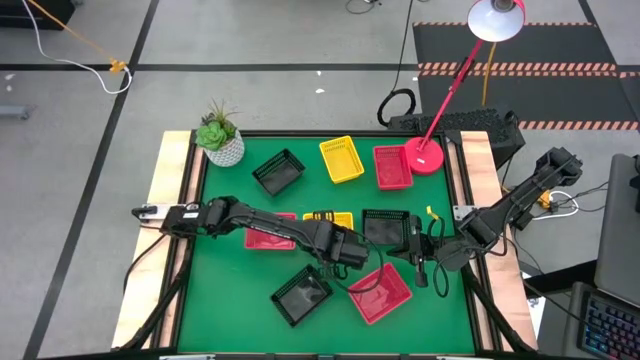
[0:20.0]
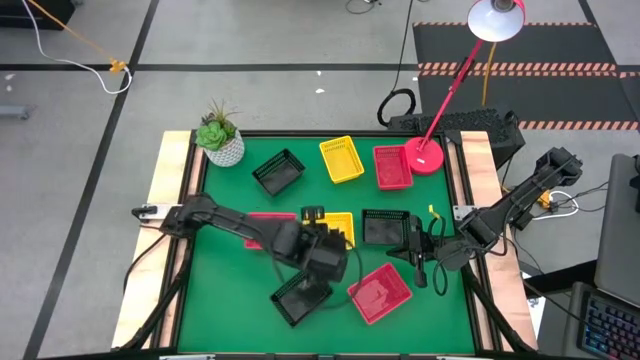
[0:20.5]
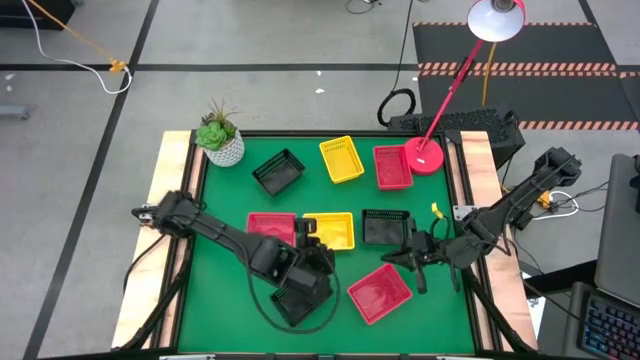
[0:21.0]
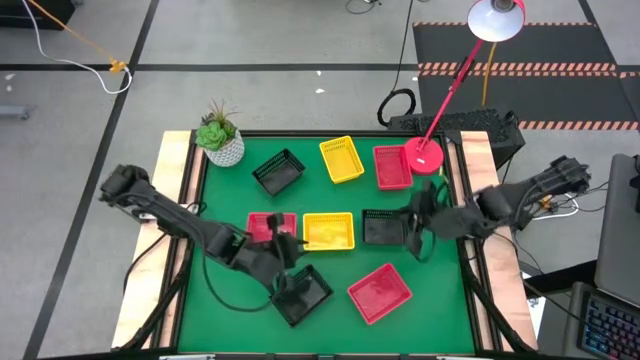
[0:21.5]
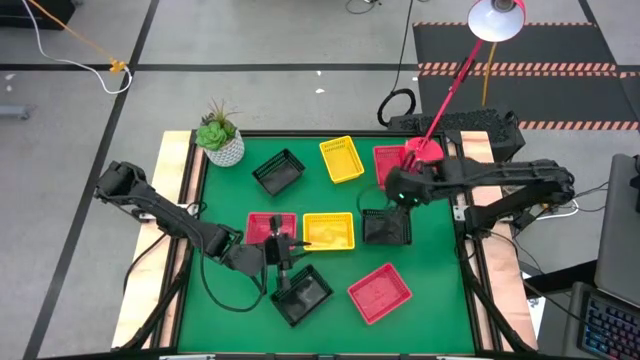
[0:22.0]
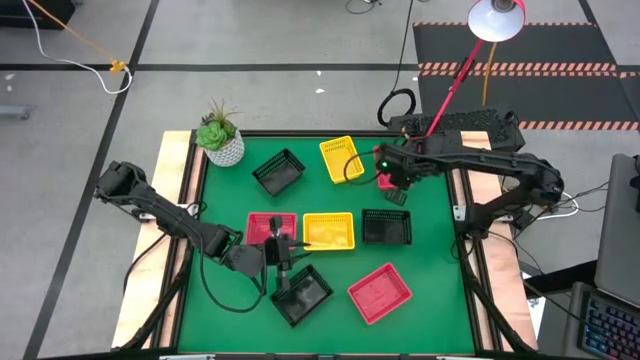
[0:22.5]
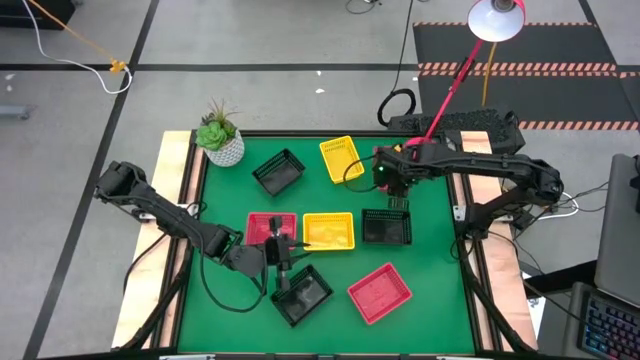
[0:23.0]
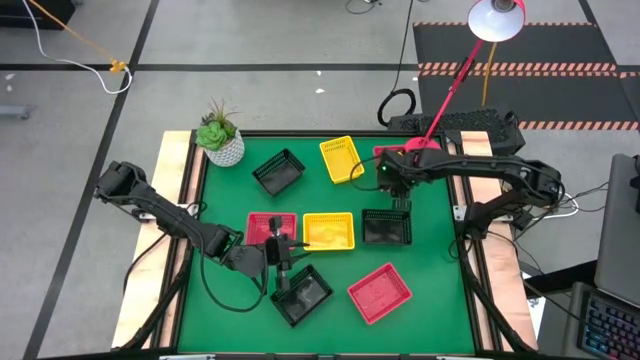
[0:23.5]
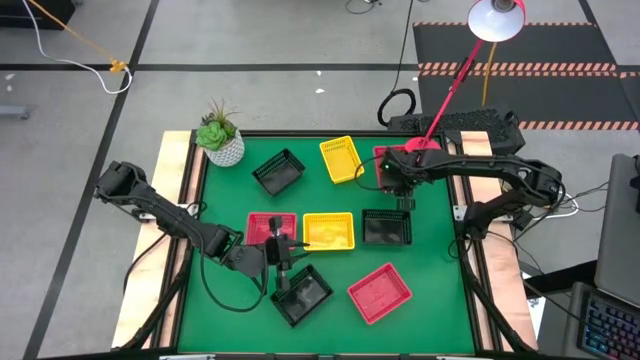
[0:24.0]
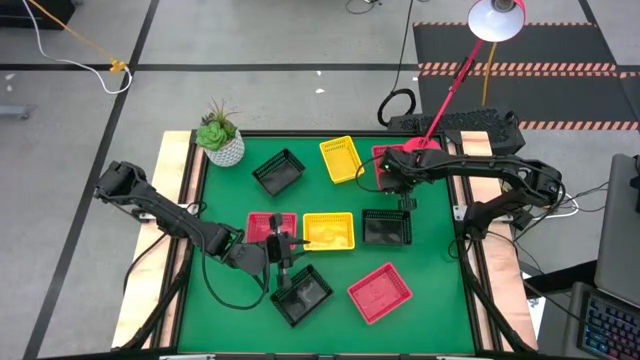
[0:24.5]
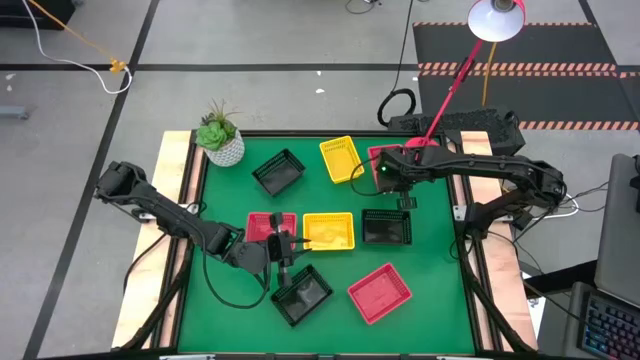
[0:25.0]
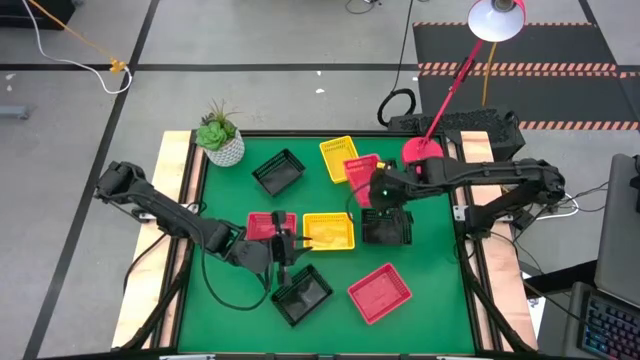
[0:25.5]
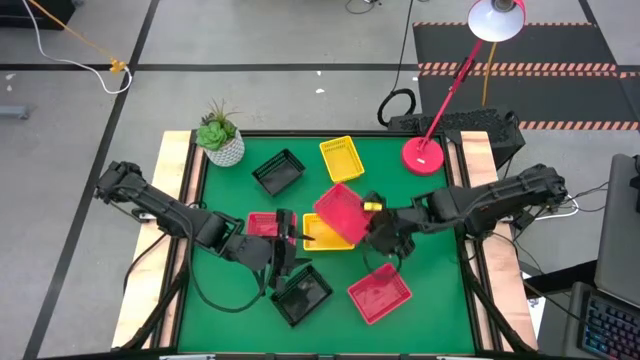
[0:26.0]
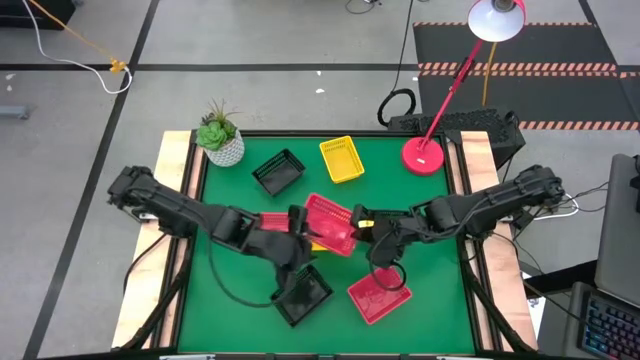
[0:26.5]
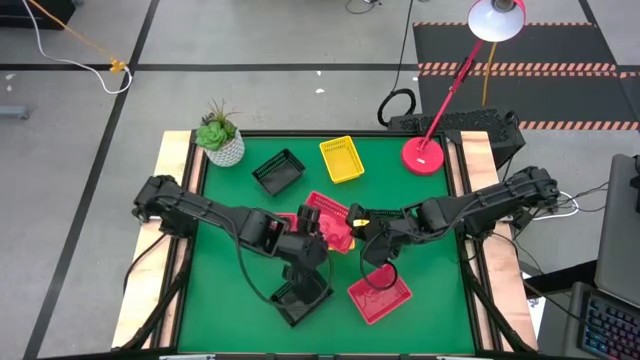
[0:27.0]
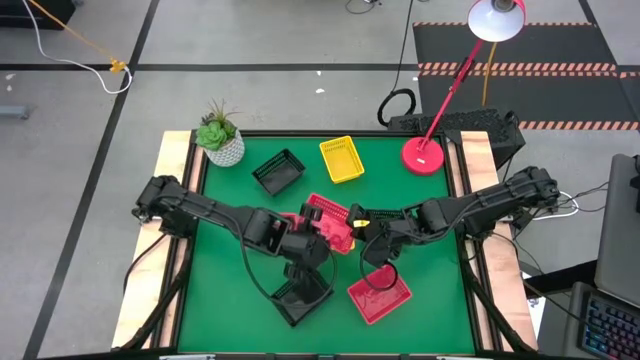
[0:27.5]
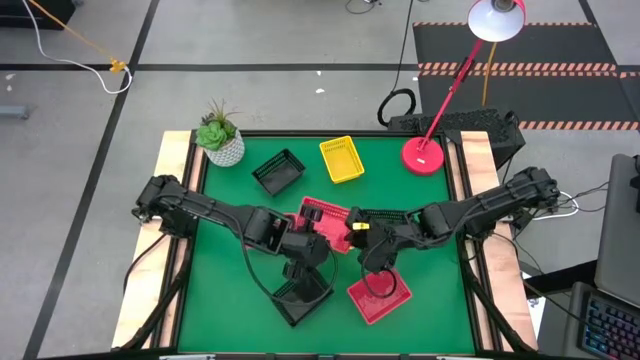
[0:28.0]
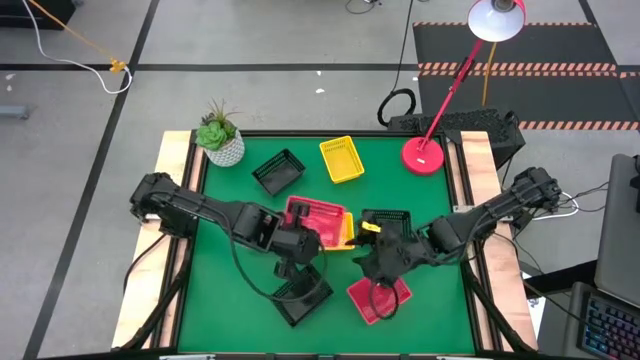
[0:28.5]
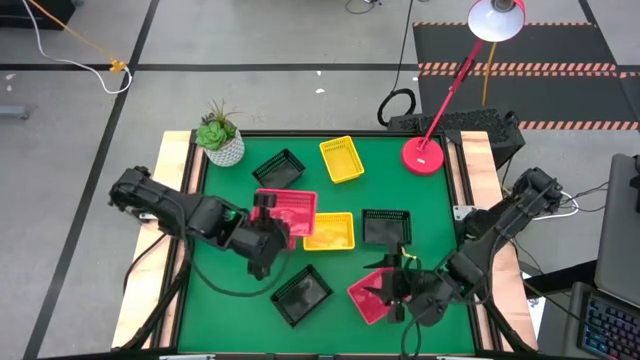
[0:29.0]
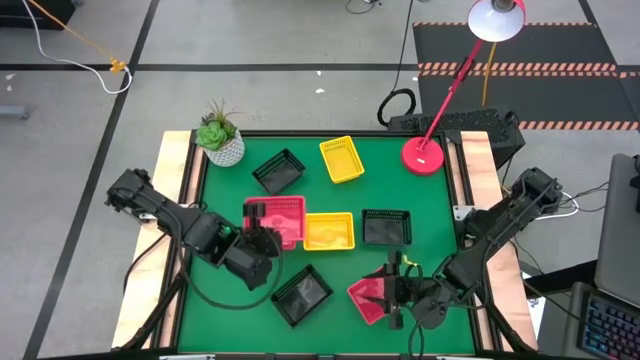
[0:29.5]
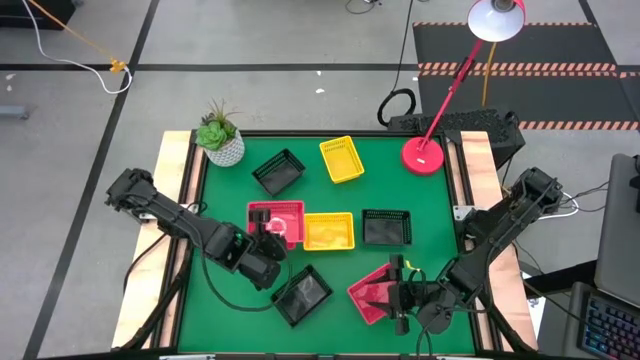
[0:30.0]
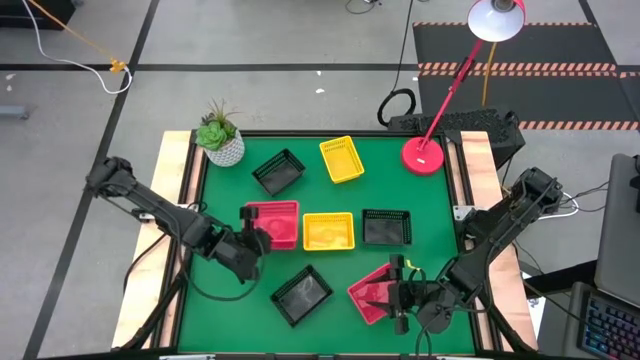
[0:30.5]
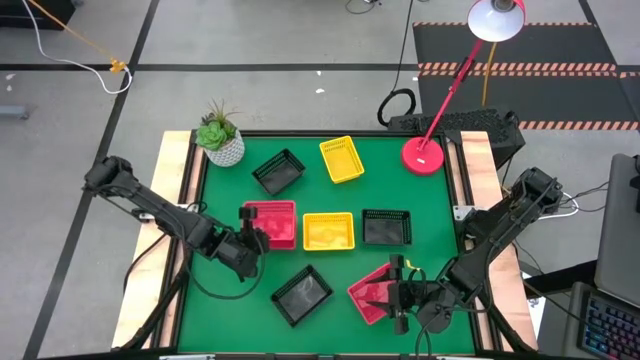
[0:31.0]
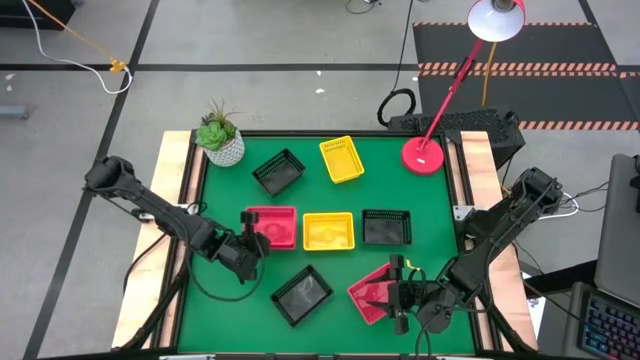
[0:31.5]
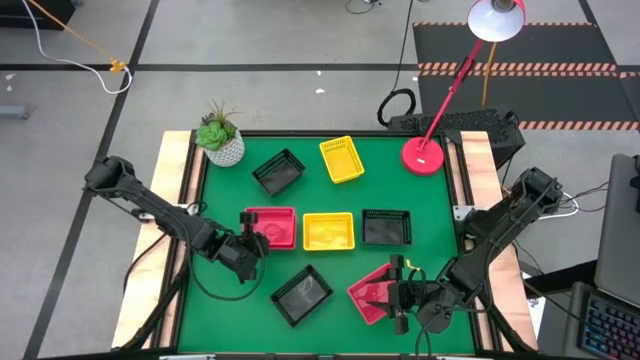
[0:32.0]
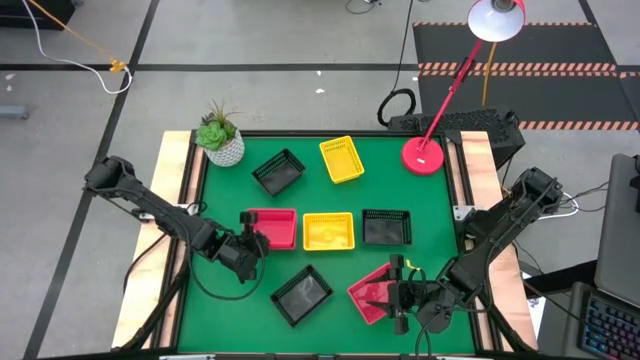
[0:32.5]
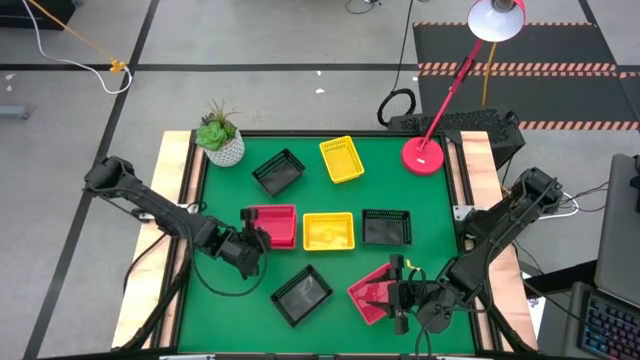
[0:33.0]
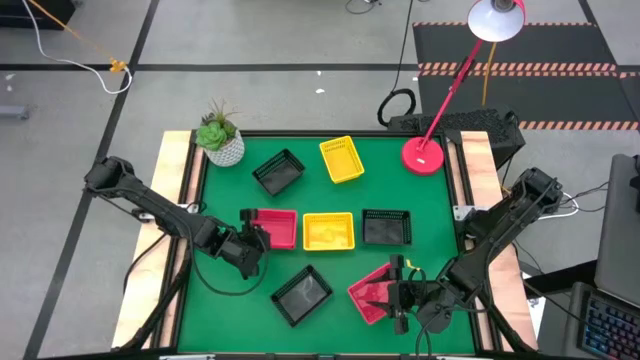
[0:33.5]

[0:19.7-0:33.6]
Stack the top red bin on top of the red bin

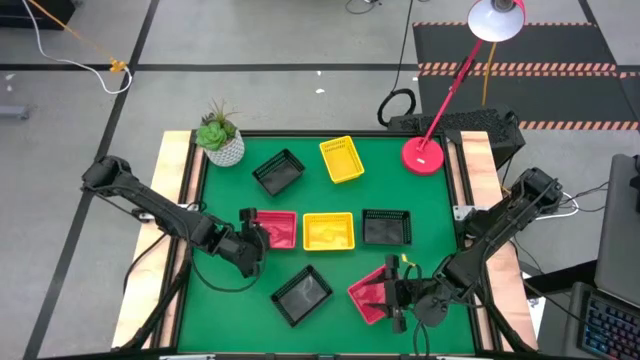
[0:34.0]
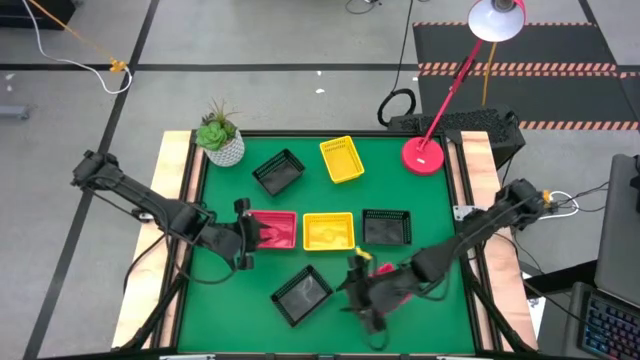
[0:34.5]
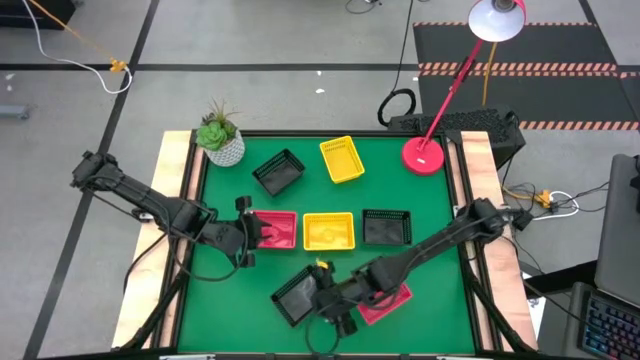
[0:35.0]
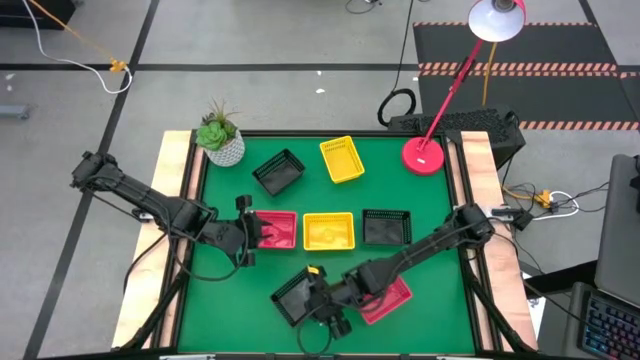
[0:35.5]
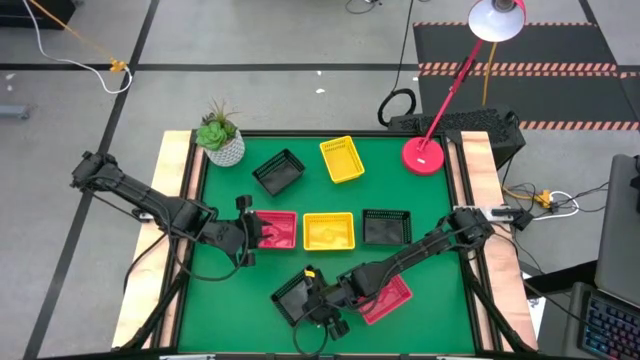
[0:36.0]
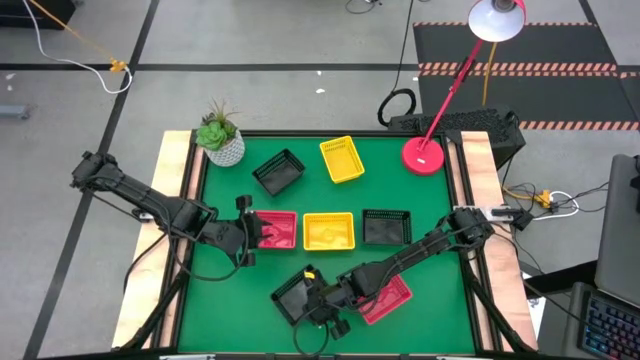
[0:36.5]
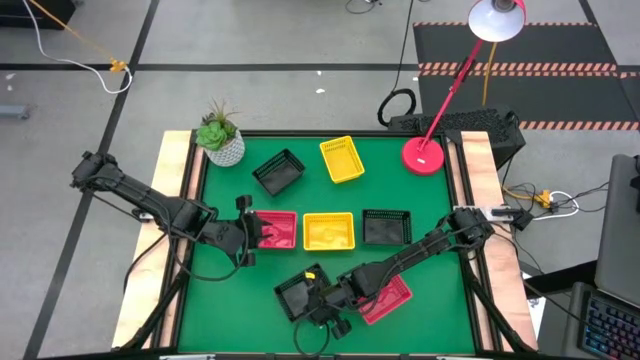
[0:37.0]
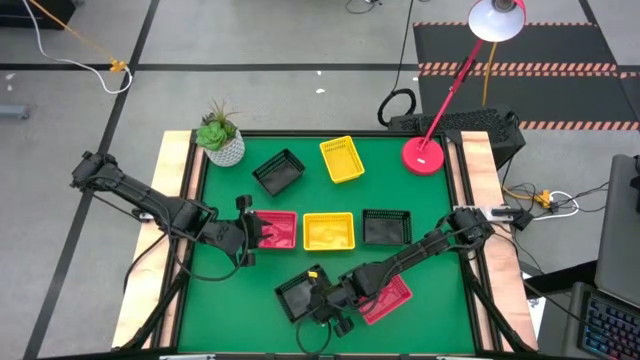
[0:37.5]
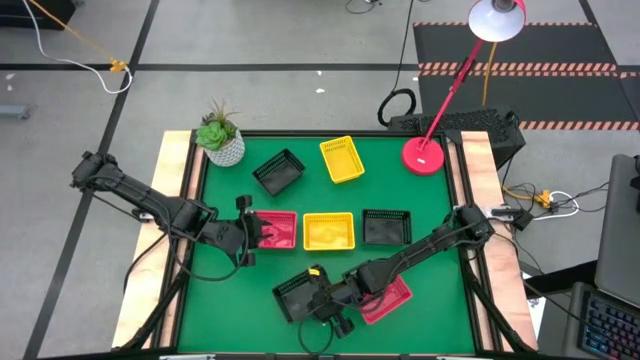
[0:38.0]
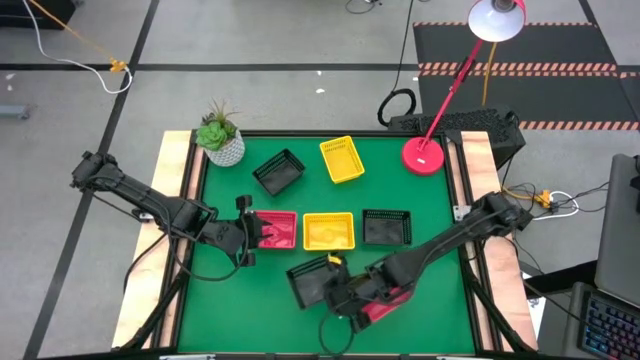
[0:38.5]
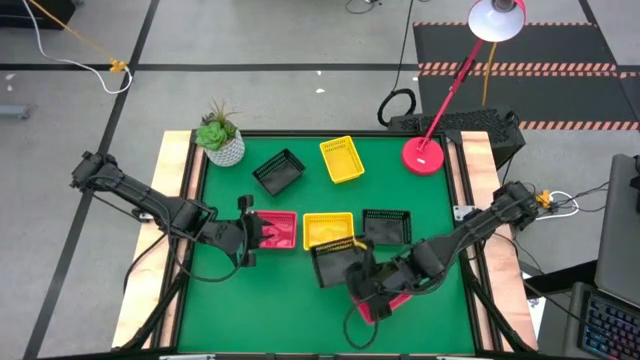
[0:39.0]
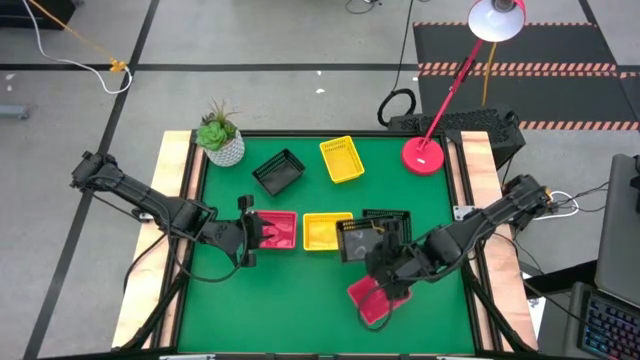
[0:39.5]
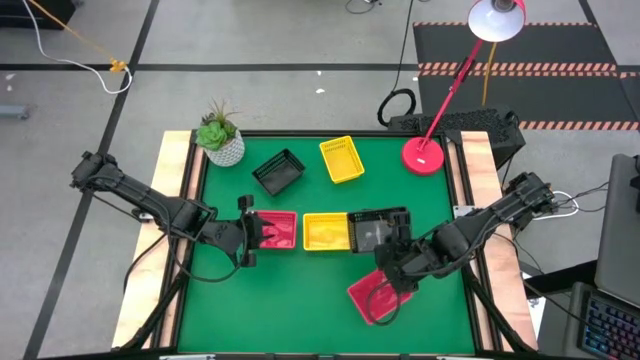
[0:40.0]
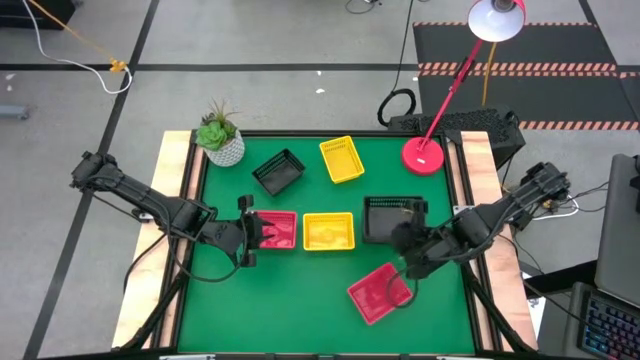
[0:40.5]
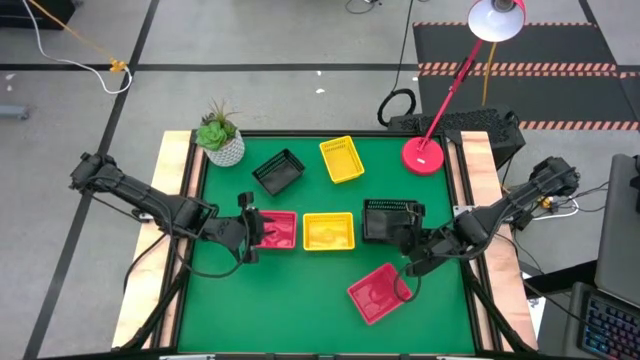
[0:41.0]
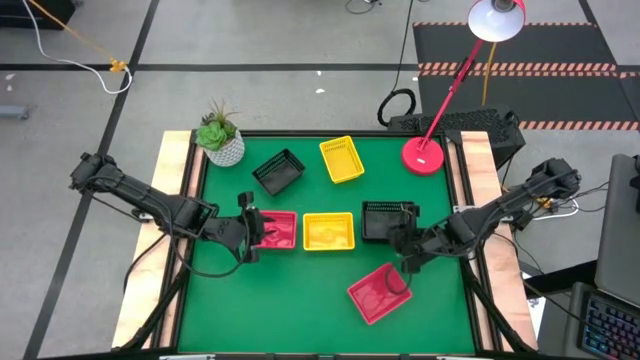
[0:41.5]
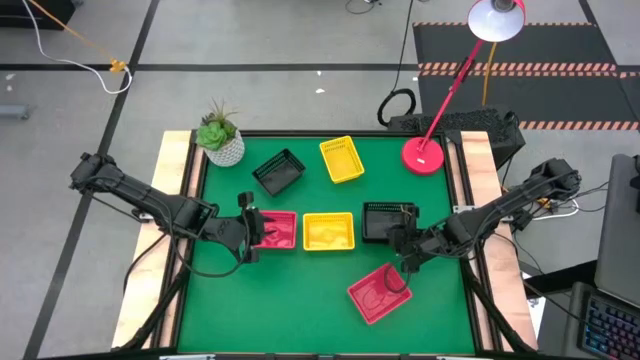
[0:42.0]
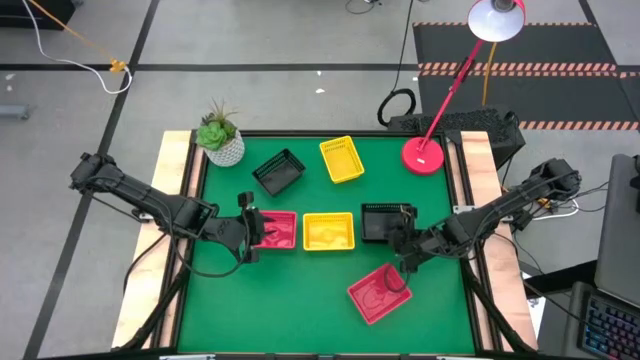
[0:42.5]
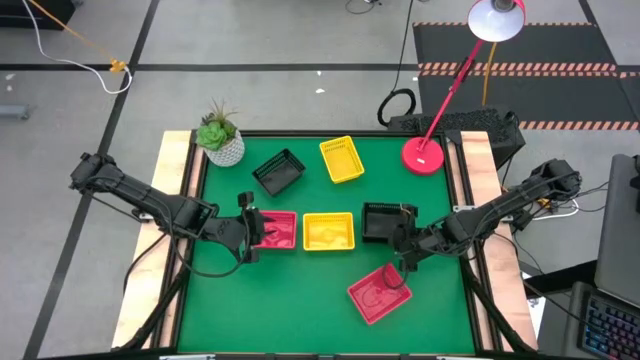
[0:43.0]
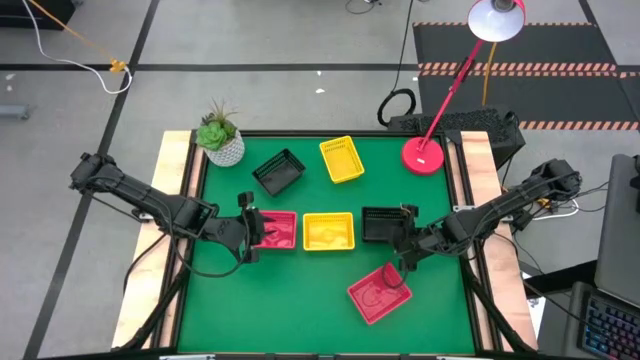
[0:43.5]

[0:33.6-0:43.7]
Stack the bottom black bin on top of the black bin
